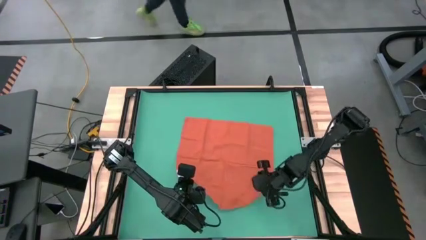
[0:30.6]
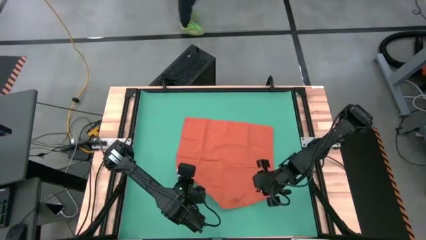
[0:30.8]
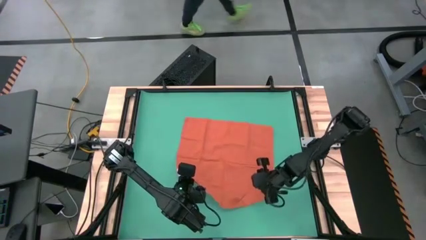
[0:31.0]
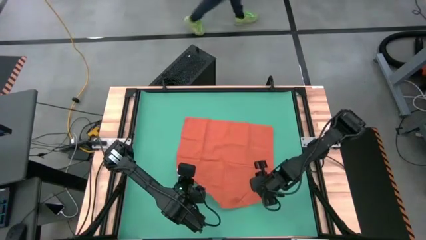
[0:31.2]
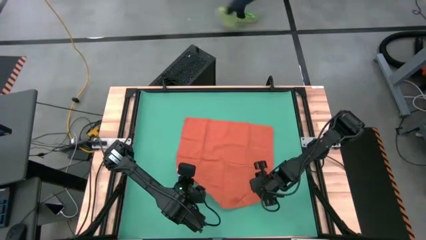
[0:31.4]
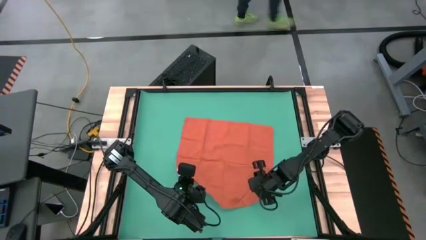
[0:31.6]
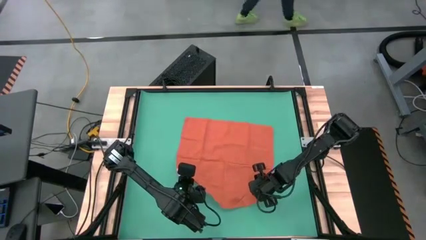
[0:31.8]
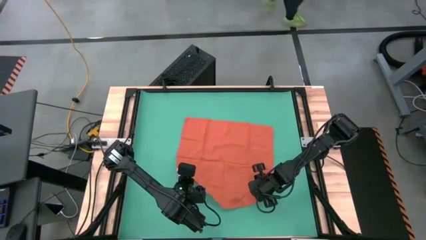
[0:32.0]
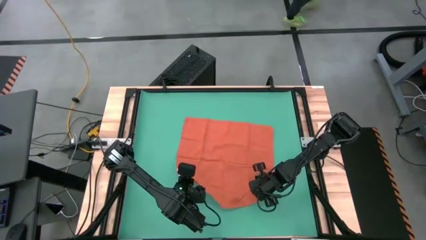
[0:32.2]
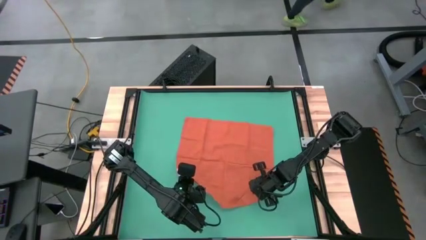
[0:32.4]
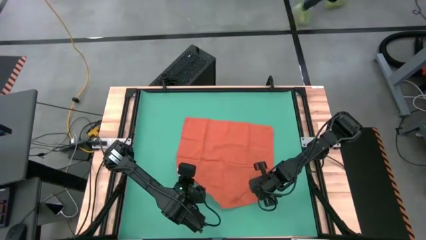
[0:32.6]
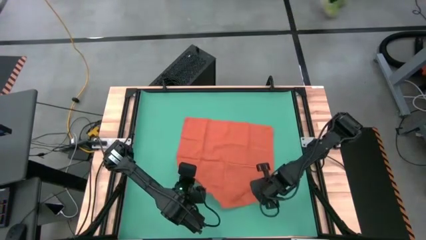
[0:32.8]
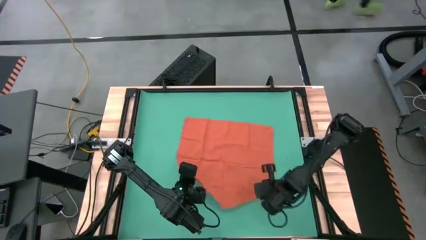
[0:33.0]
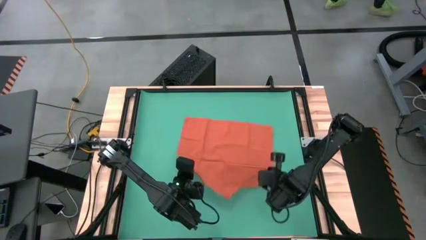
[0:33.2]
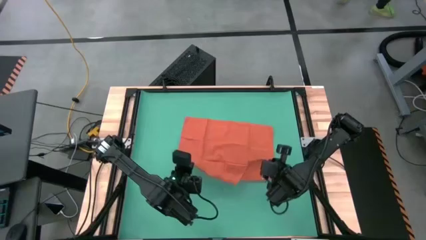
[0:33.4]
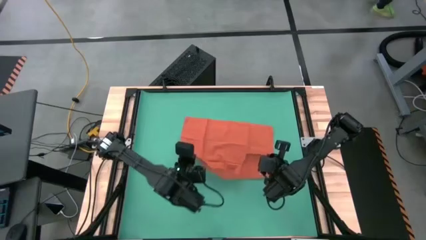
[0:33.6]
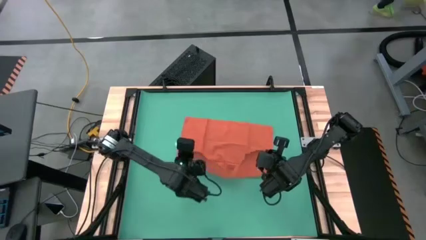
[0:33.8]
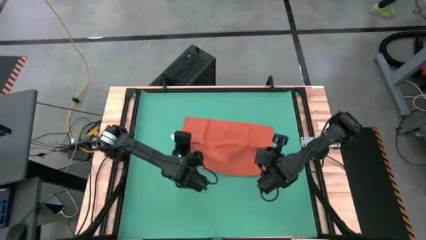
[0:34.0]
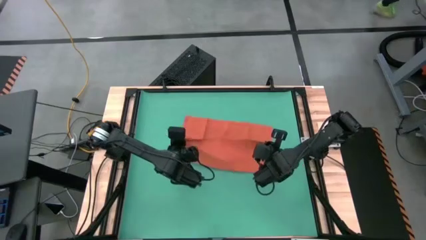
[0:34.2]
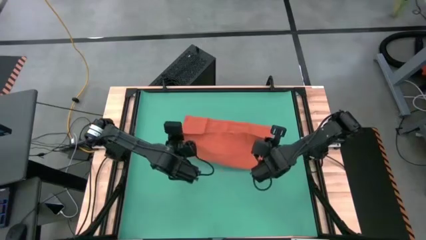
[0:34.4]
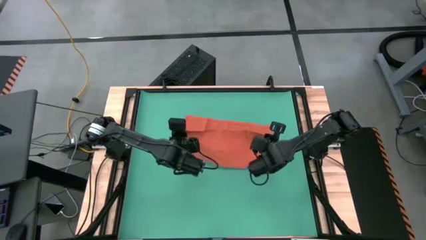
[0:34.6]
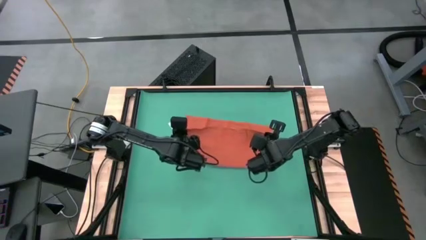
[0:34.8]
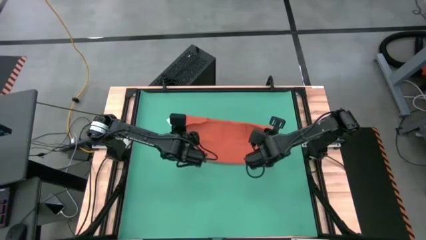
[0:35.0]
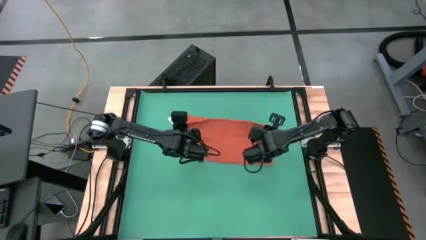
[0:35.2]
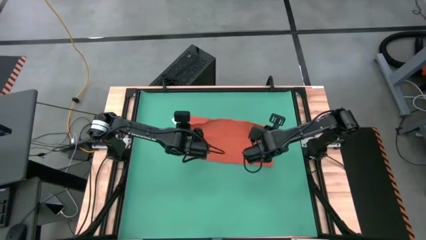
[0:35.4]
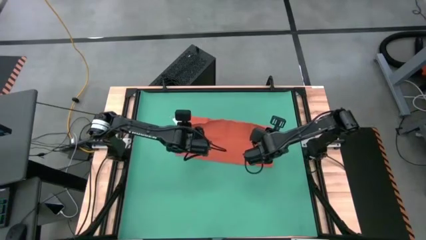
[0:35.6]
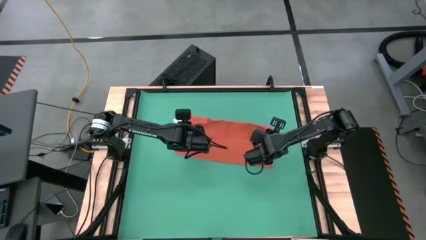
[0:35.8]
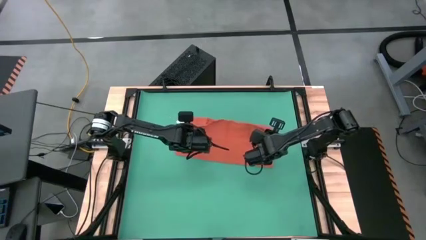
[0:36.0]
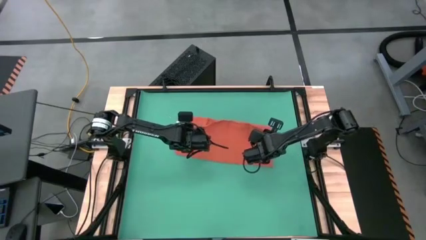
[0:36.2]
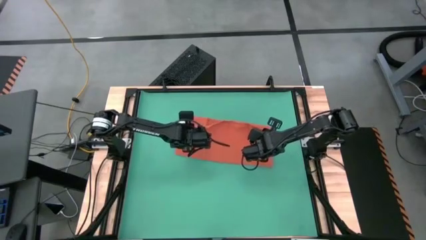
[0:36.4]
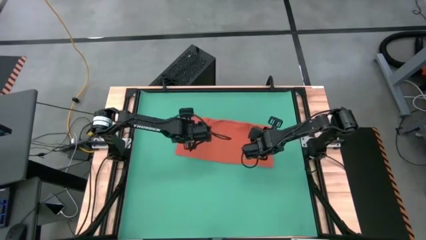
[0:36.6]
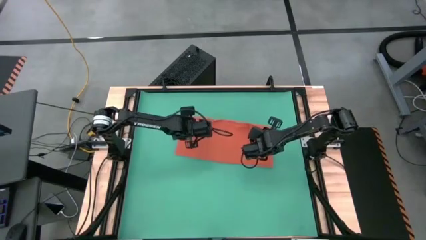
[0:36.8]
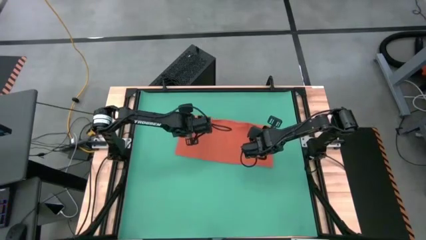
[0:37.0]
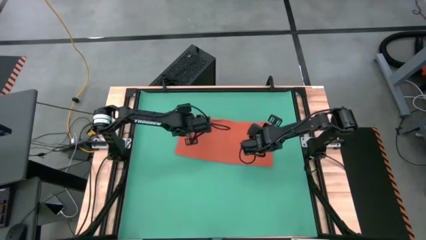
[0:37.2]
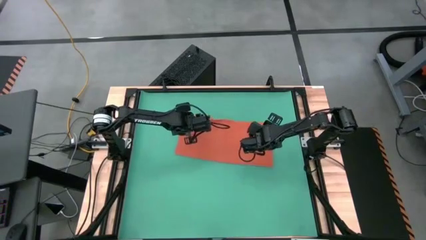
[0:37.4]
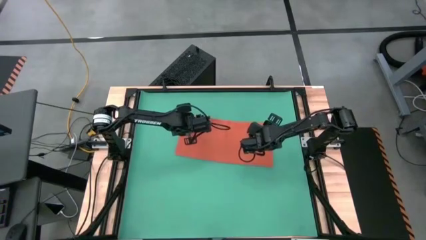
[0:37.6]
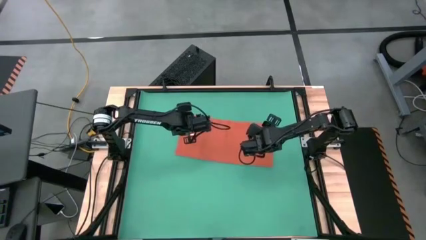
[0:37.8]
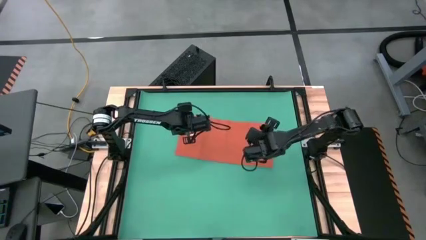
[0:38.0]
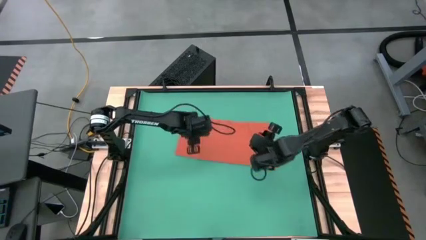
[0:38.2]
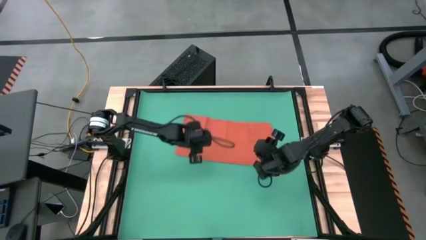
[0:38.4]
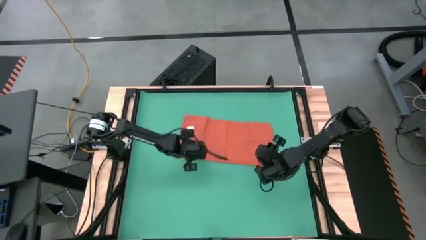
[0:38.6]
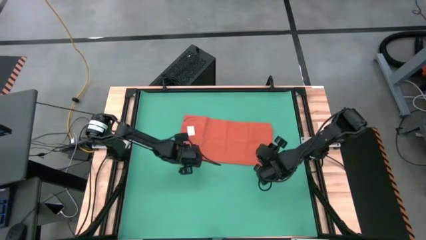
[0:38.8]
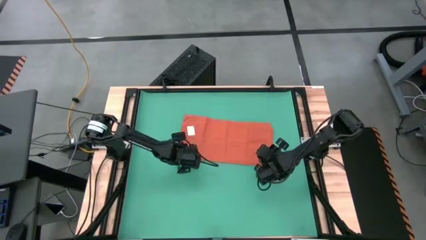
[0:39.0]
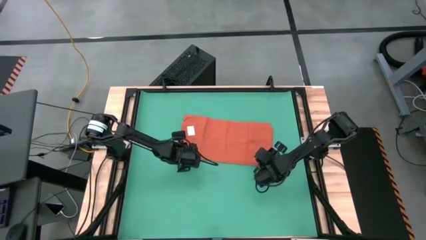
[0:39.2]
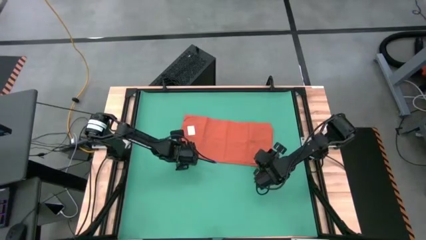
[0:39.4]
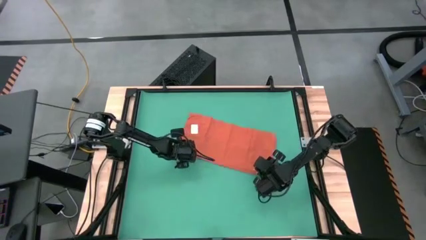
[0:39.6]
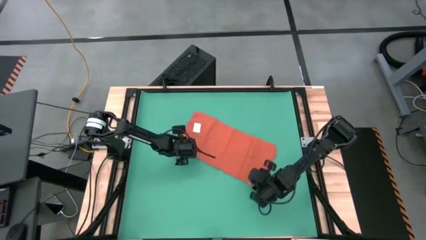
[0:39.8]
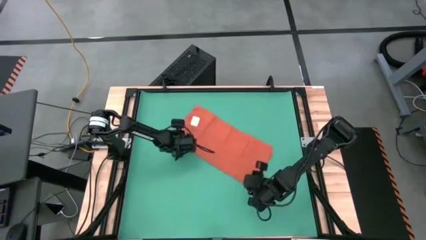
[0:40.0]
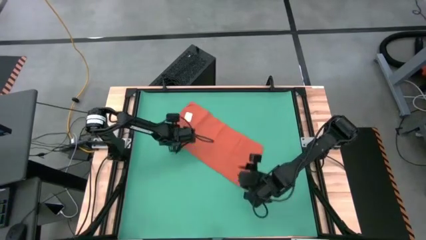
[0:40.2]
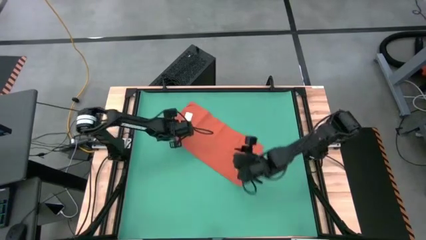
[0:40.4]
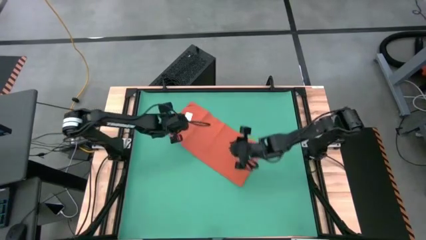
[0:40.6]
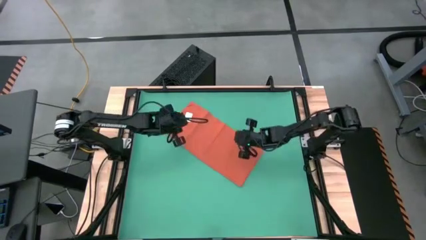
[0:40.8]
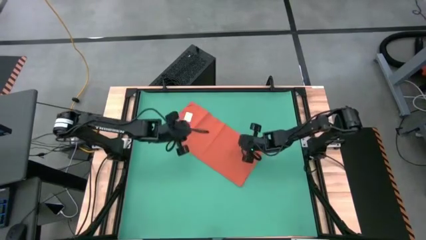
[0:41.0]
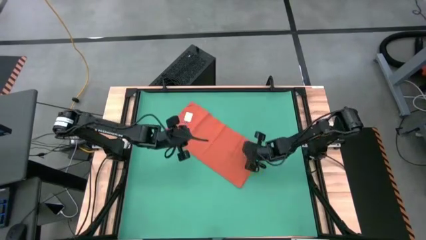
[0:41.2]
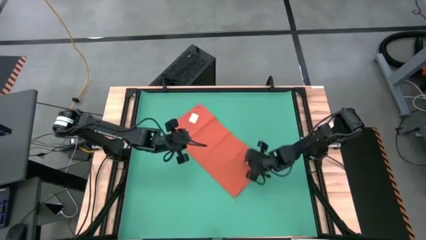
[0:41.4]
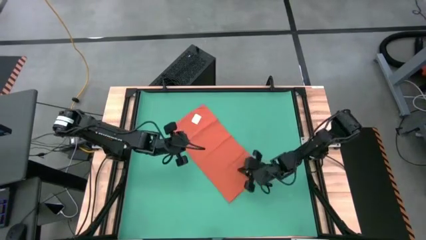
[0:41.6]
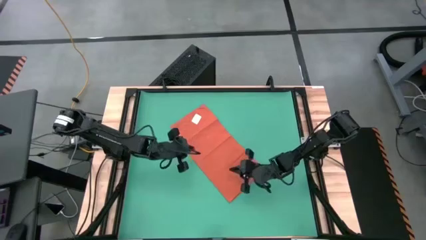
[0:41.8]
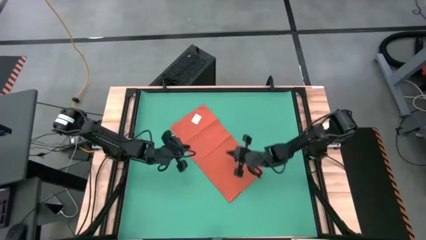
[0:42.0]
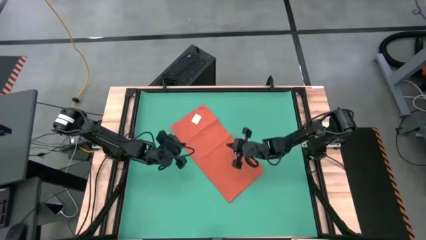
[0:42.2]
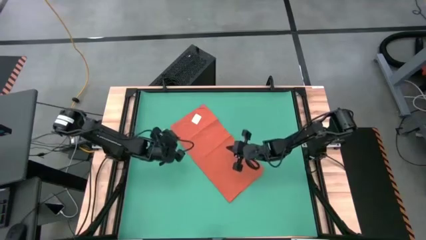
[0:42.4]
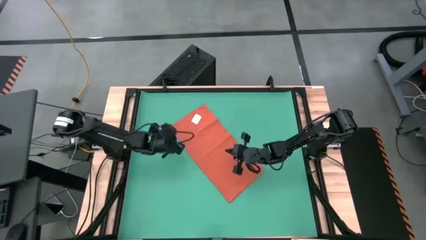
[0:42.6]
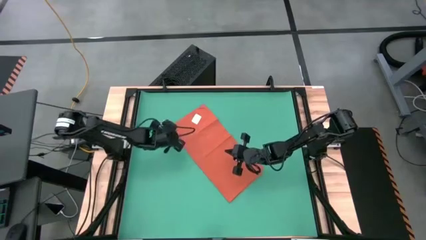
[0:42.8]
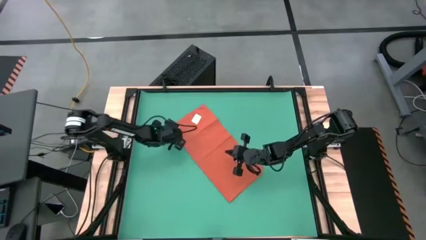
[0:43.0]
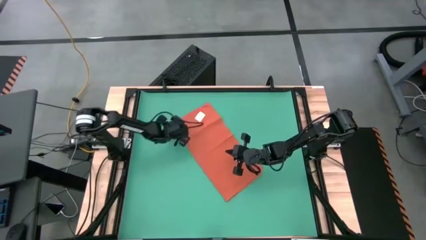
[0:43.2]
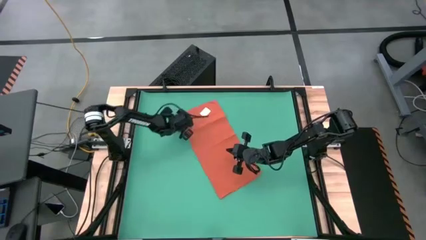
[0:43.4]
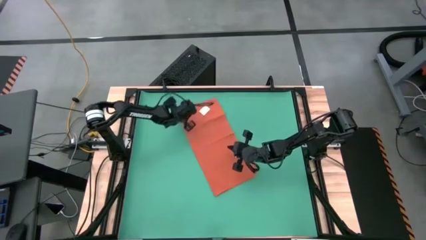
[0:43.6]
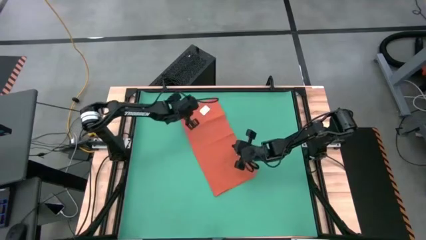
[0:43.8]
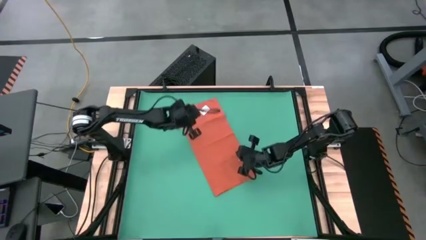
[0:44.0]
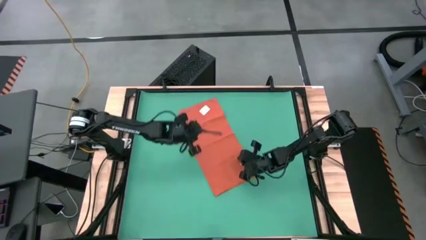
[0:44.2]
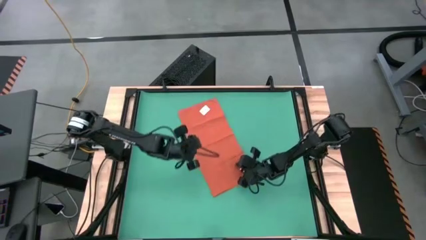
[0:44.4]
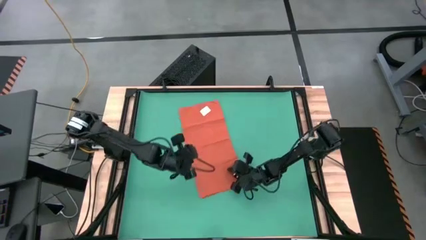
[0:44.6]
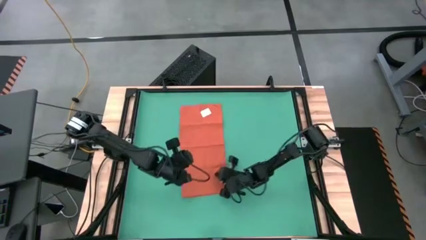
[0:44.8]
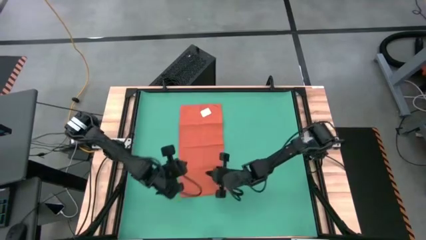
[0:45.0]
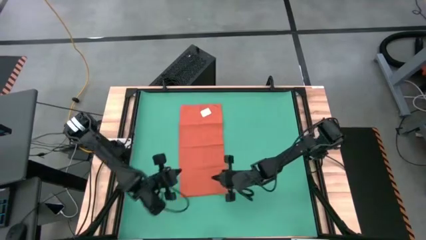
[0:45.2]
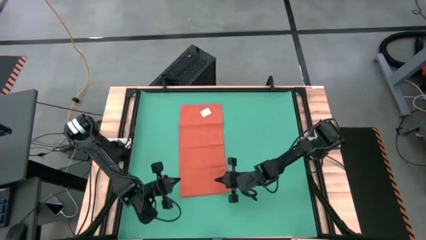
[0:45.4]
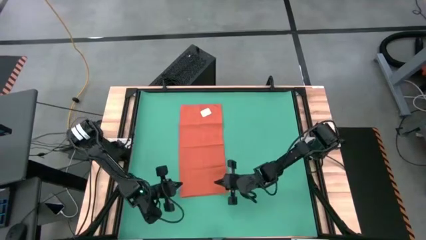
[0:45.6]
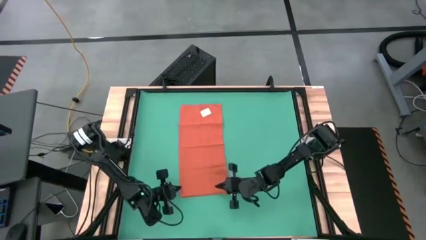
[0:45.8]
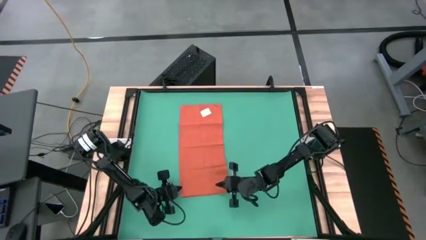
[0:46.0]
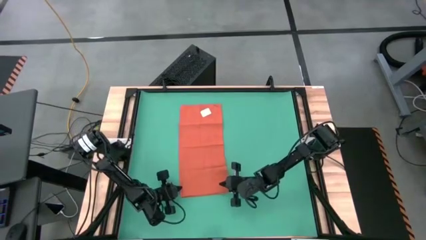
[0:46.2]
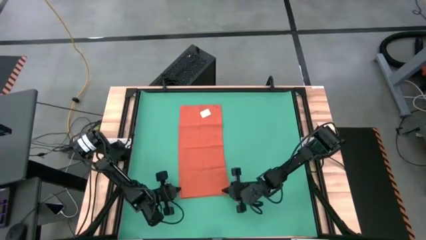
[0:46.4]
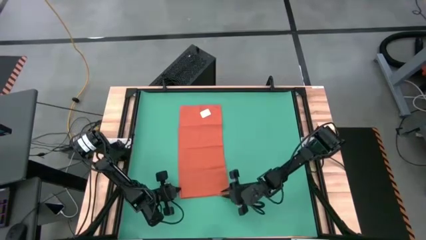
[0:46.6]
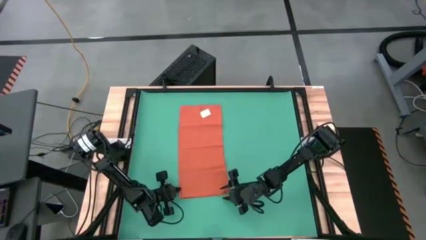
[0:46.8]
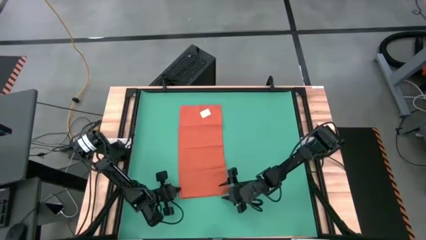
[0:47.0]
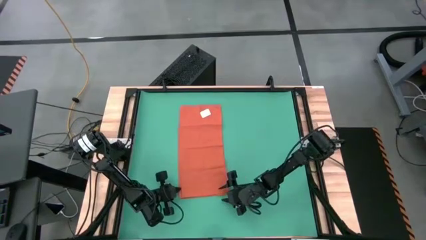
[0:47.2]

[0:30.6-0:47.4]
Task: Roll towel
Roll the orange microfiber towel
